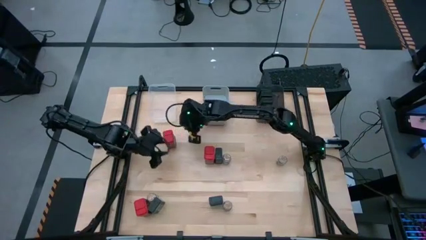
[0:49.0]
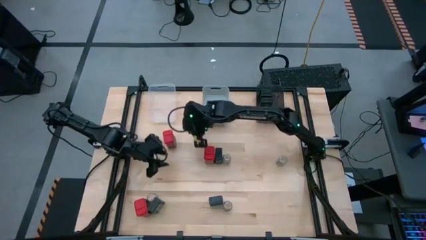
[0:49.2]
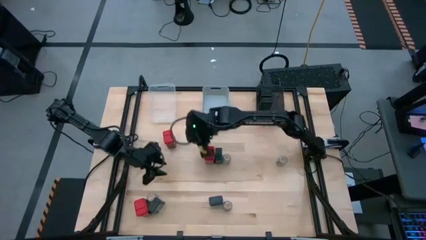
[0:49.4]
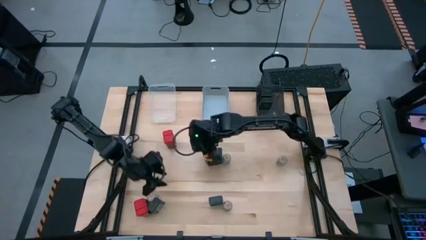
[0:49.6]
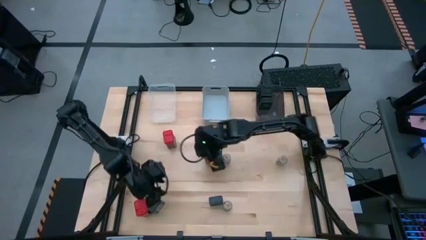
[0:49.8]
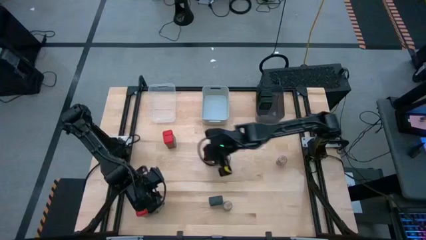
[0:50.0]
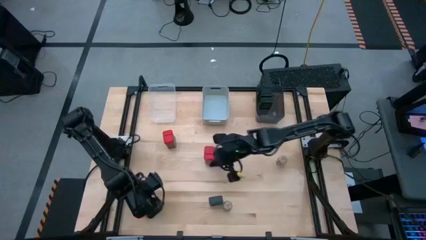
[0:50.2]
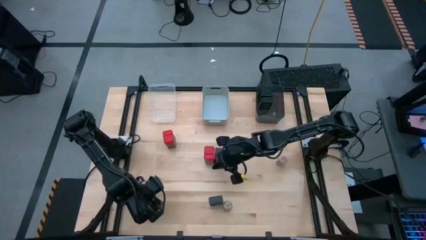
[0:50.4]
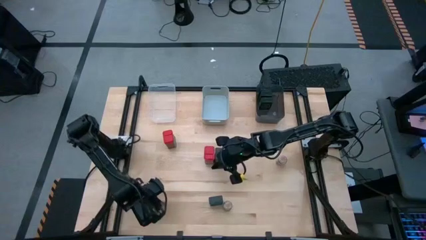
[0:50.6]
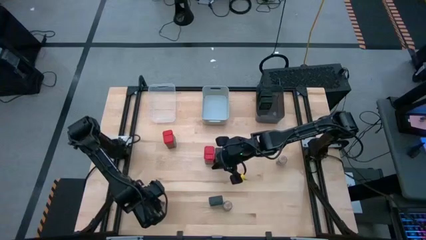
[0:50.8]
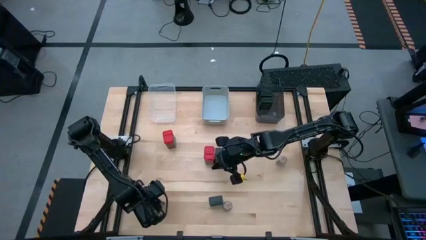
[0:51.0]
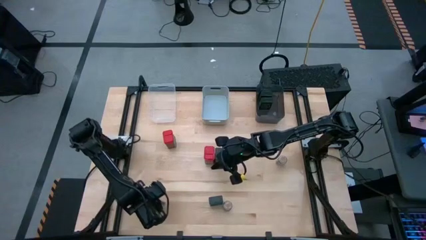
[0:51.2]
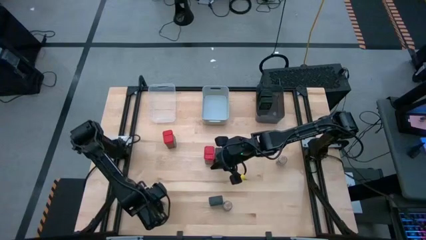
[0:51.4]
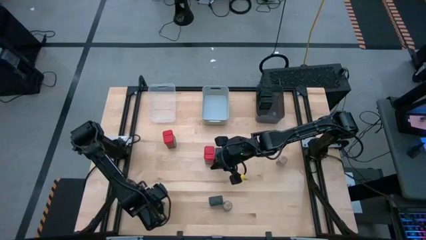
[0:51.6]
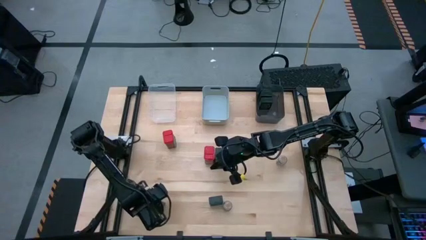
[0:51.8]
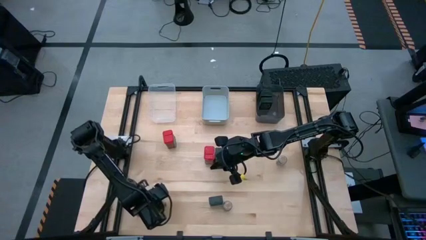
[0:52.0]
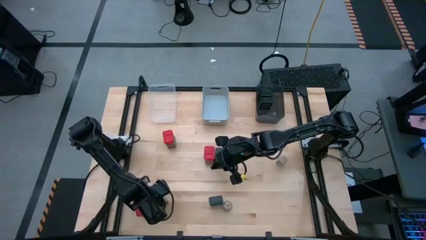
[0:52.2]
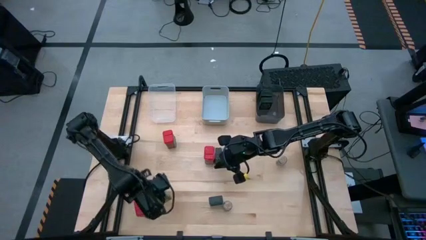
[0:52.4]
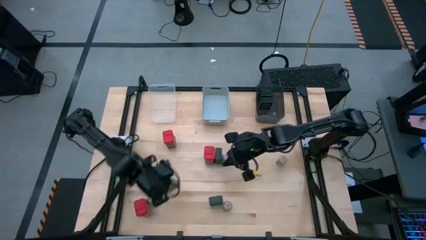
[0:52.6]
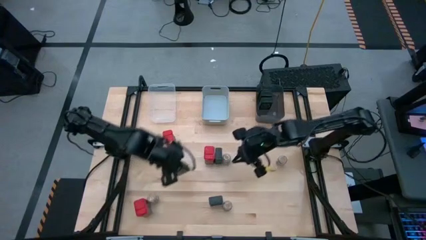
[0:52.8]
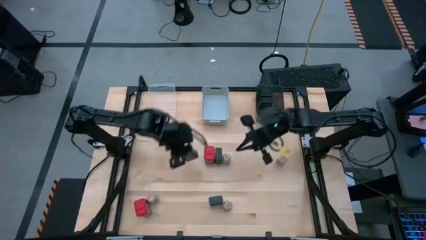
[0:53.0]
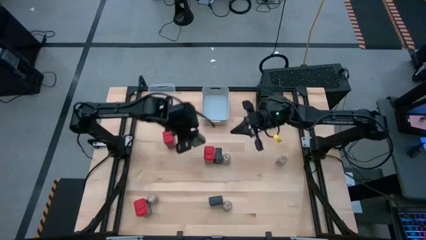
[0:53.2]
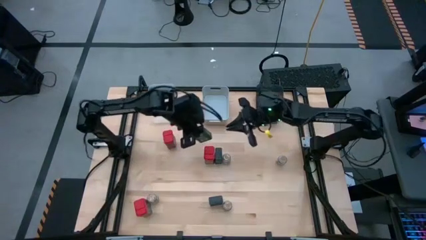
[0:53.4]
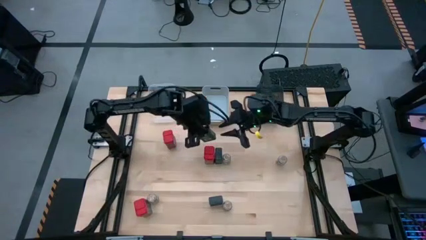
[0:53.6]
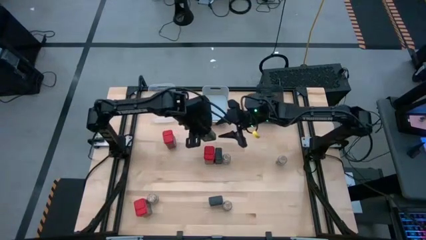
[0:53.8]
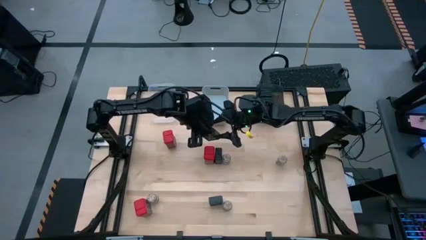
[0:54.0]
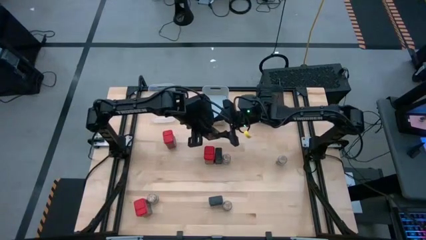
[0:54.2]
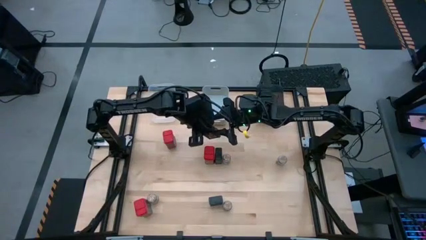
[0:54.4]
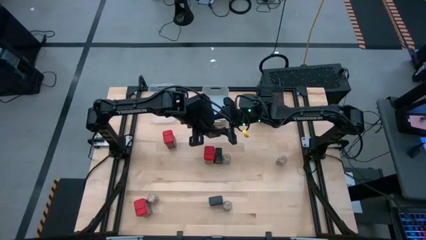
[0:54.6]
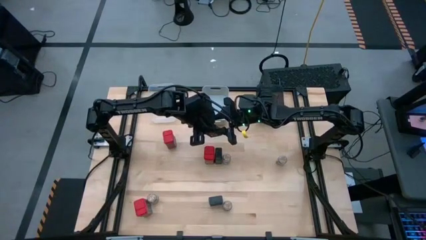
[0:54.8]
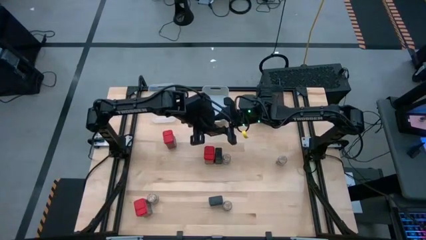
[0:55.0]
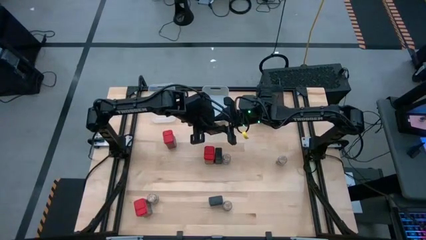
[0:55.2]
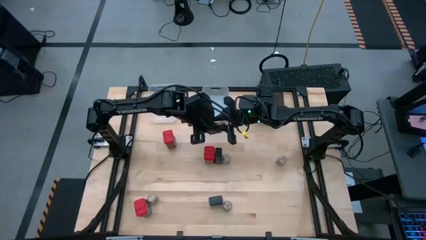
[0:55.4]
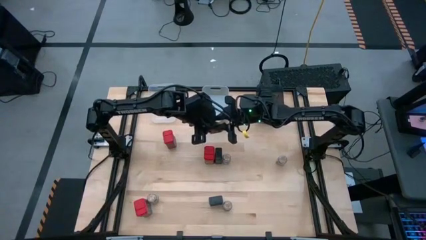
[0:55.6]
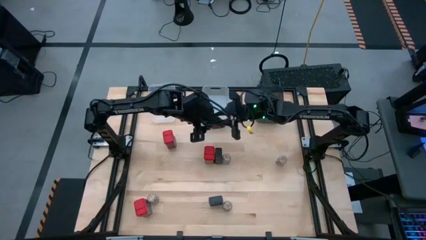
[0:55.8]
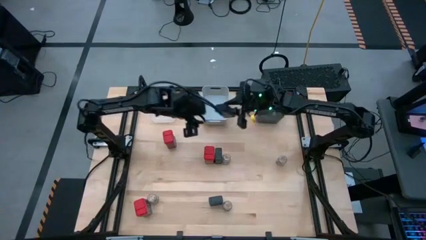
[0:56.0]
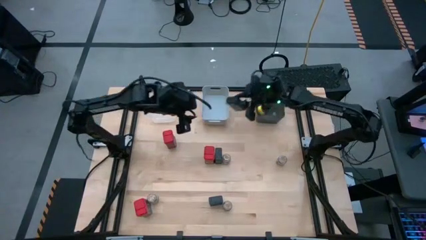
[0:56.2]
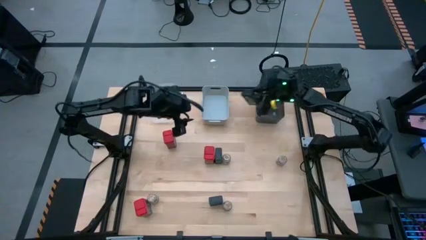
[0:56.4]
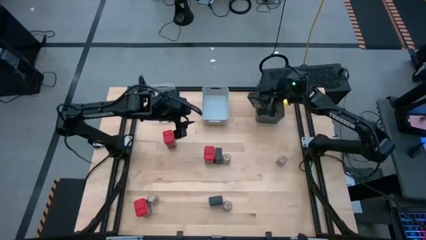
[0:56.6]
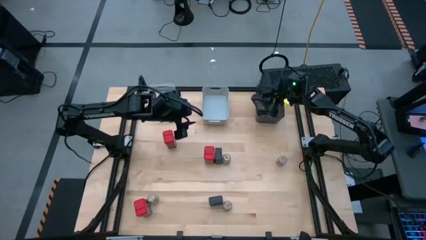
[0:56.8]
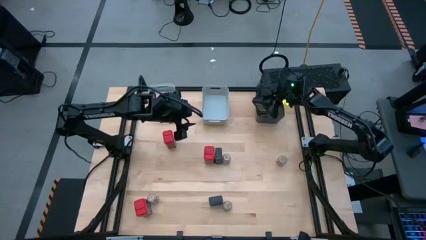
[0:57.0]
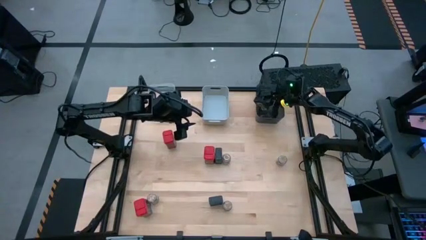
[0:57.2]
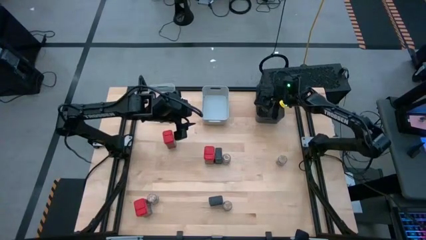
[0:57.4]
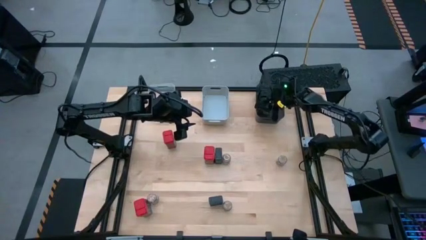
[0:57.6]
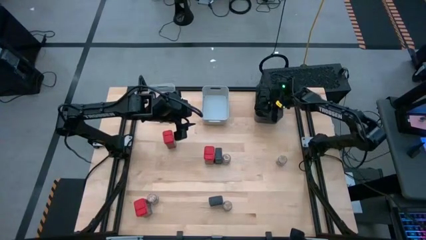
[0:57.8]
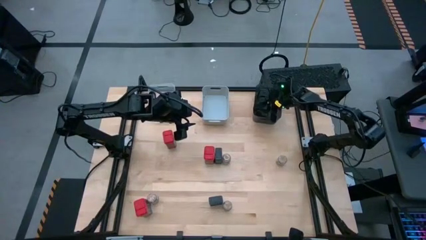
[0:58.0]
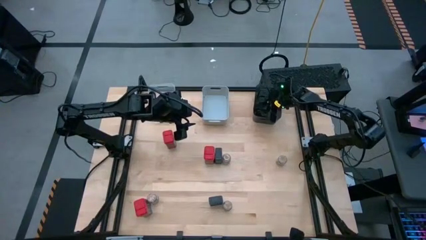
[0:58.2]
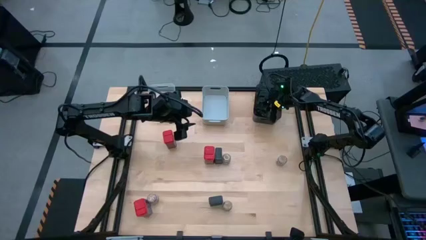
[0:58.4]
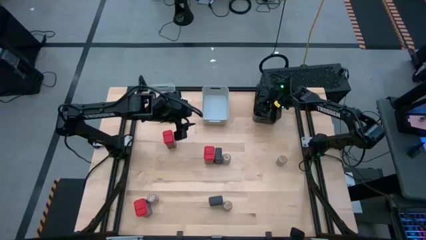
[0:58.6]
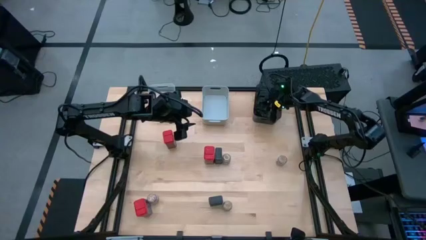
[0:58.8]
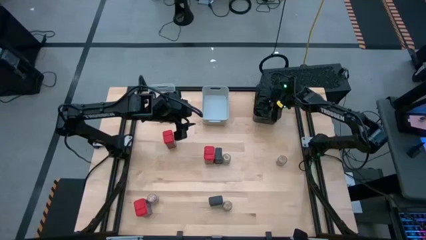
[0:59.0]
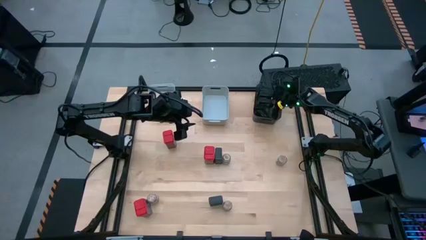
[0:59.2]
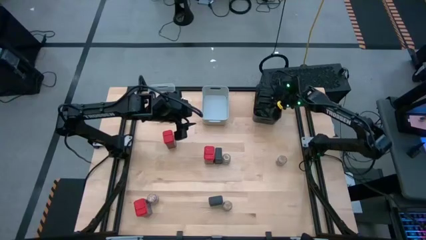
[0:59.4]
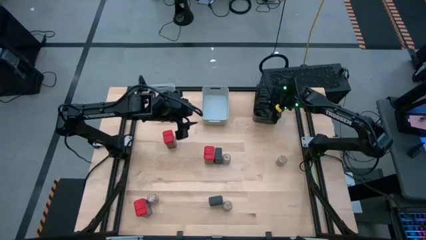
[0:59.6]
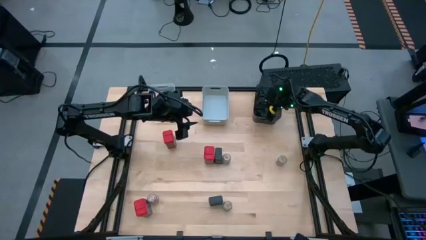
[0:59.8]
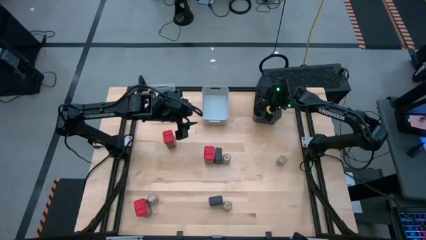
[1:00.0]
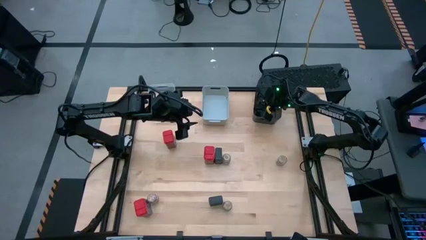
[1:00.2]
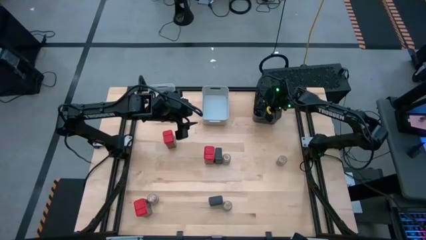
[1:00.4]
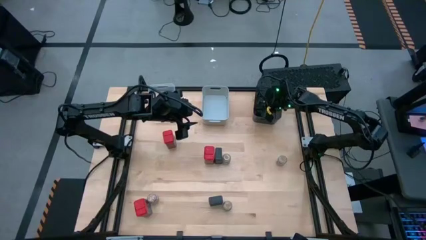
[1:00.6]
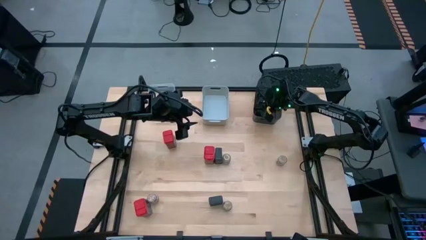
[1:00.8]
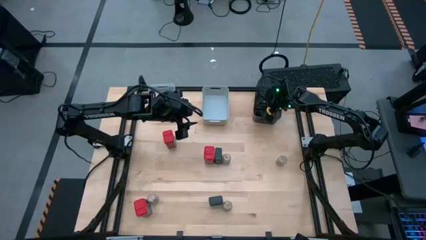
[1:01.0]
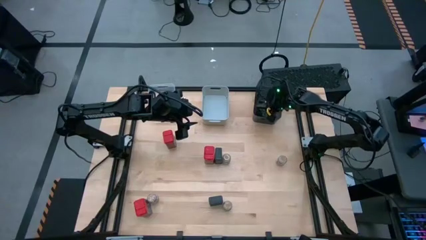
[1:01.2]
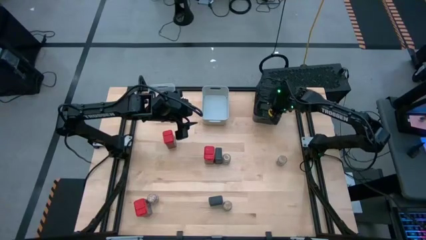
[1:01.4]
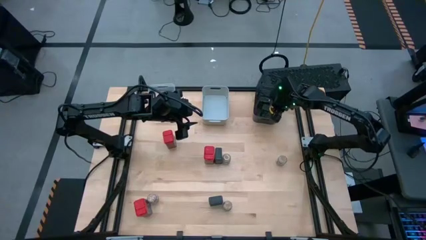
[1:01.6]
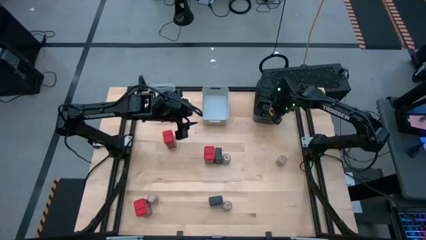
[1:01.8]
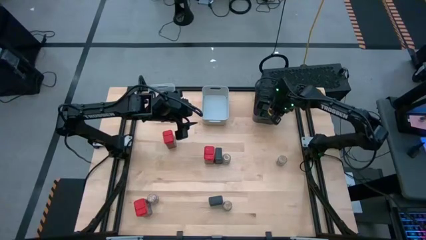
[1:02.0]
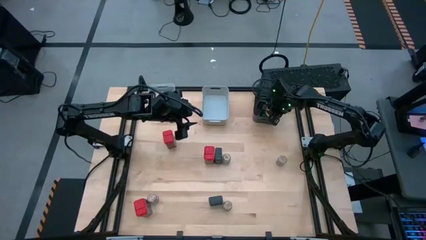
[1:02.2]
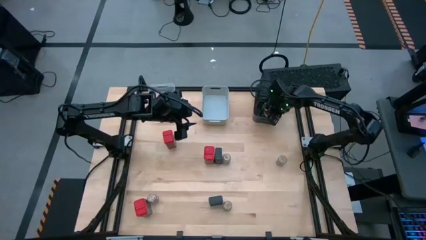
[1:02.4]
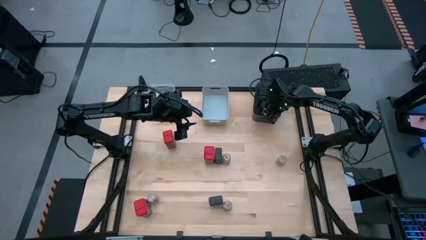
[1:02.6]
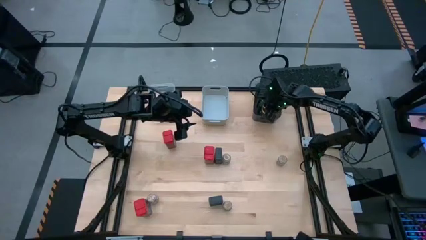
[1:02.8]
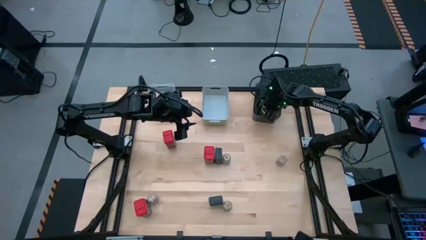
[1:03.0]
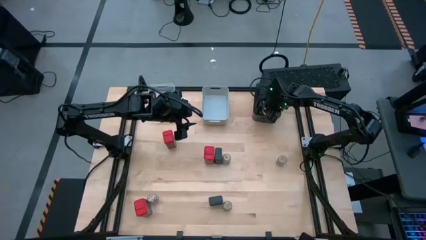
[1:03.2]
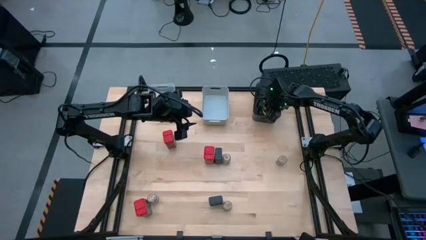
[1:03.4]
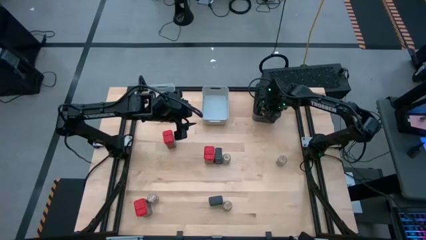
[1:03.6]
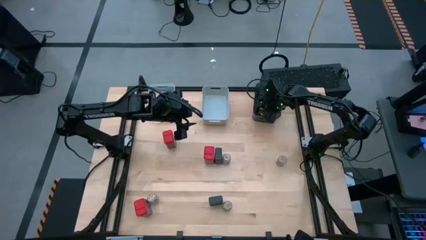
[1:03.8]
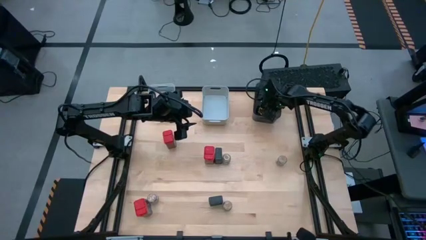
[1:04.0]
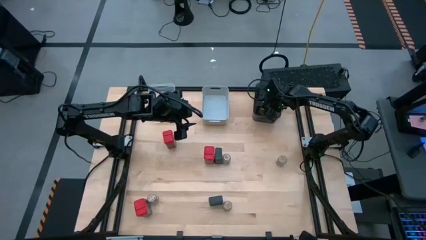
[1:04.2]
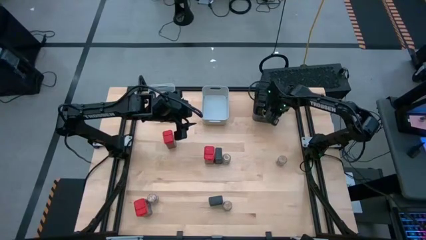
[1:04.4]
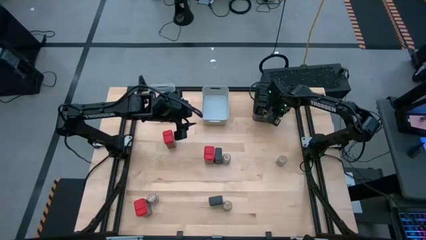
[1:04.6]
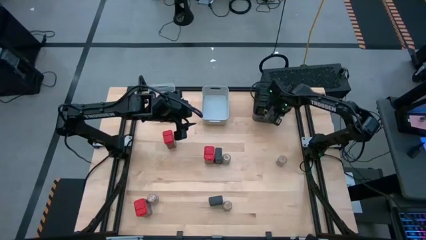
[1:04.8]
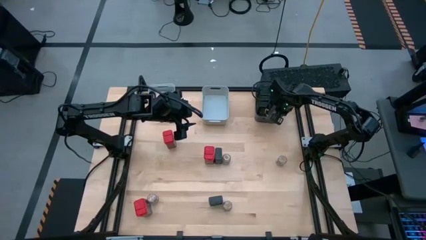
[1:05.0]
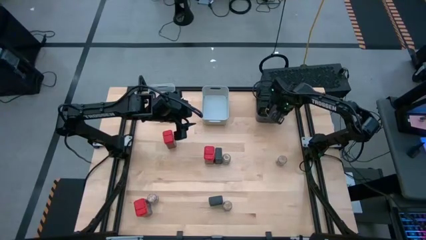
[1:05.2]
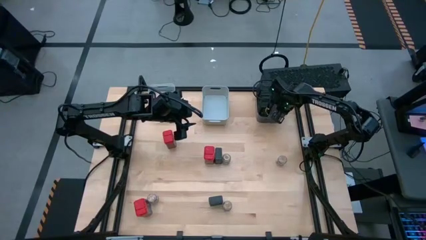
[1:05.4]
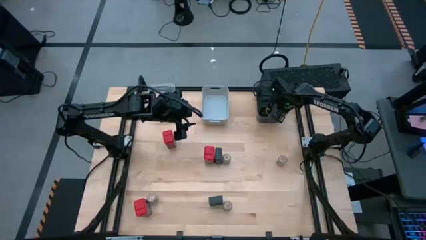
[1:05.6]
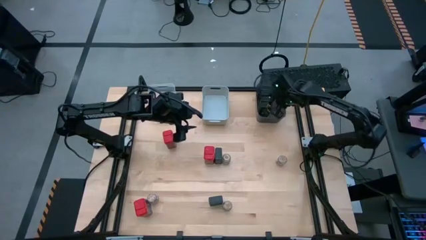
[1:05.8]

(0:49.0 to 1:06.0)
Task: Sort spices by type
Put the green seasoning can into the black bin
